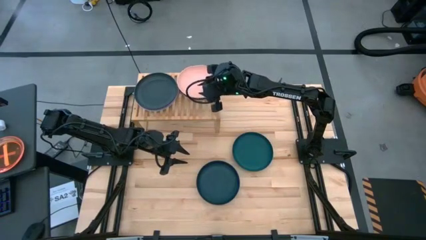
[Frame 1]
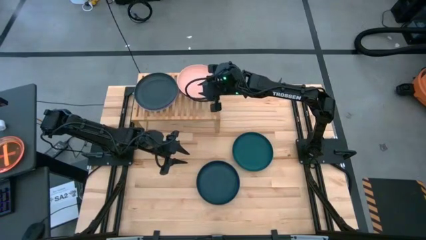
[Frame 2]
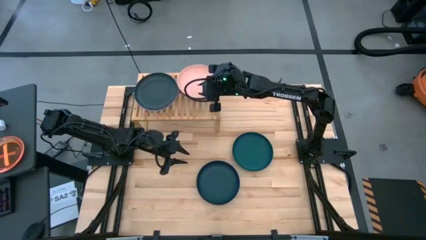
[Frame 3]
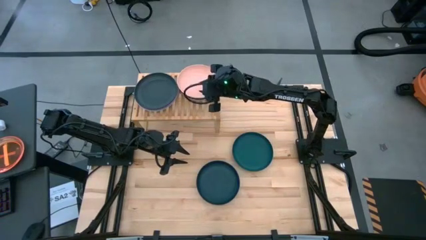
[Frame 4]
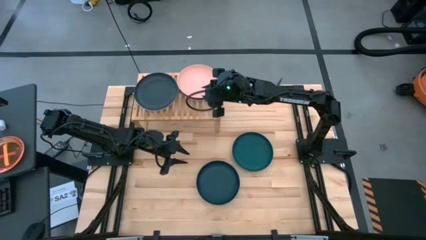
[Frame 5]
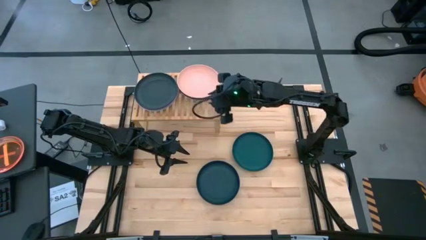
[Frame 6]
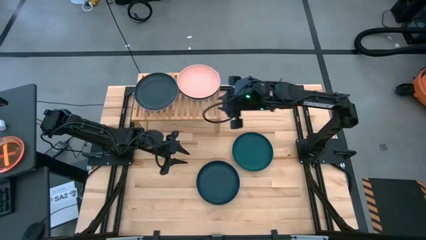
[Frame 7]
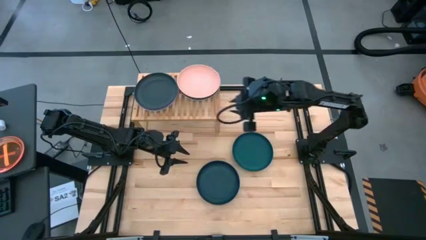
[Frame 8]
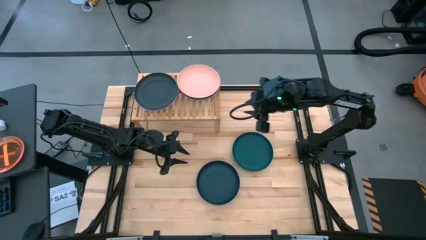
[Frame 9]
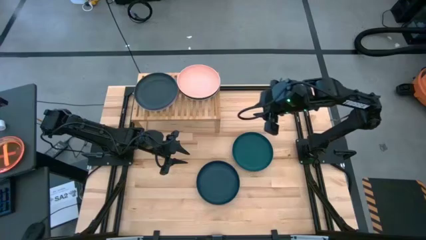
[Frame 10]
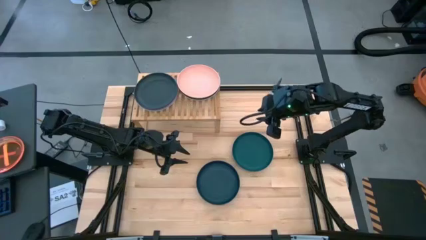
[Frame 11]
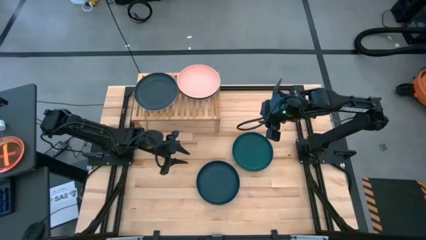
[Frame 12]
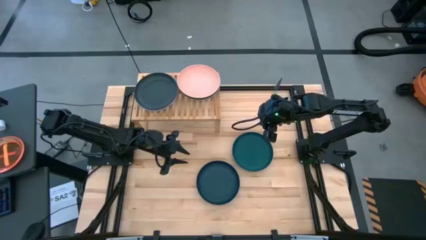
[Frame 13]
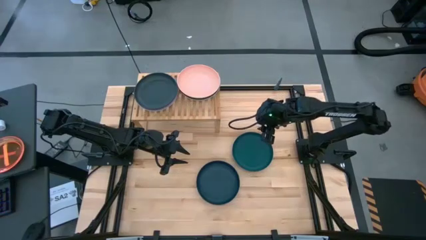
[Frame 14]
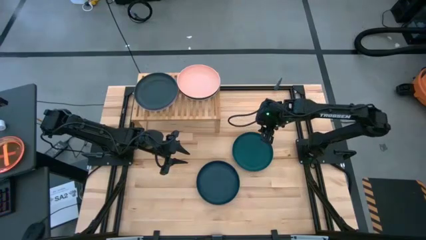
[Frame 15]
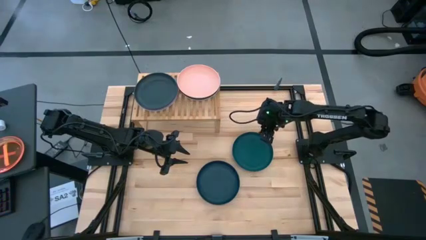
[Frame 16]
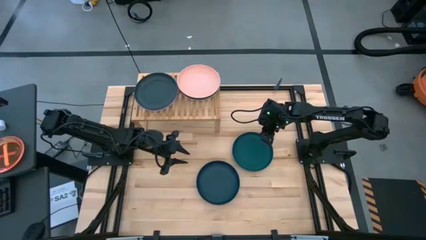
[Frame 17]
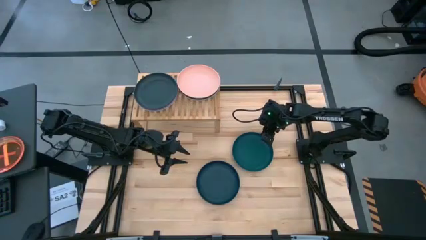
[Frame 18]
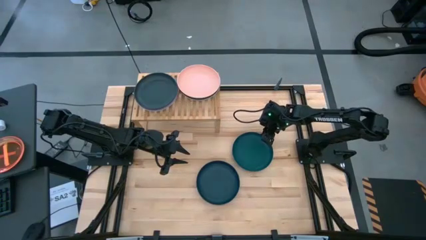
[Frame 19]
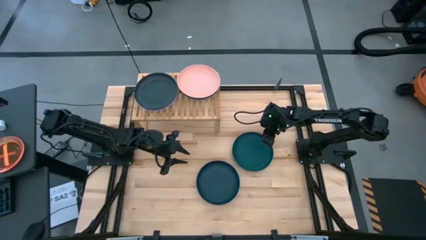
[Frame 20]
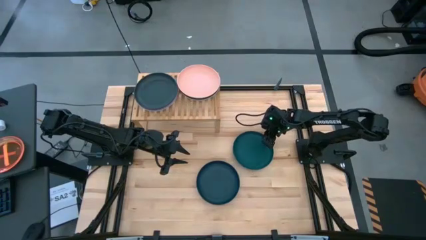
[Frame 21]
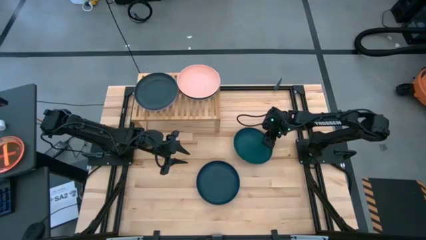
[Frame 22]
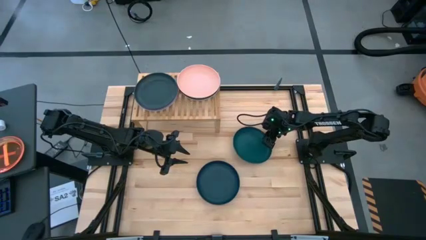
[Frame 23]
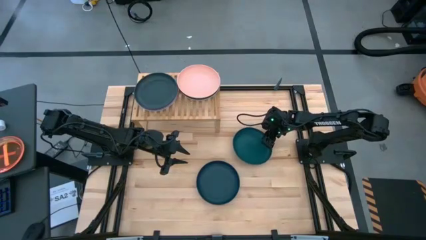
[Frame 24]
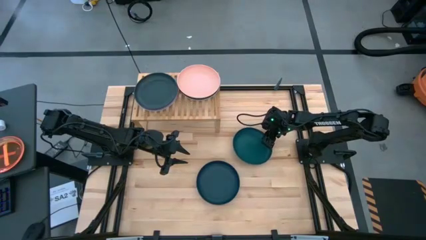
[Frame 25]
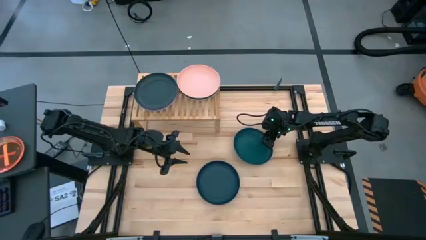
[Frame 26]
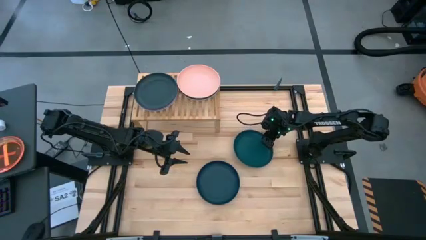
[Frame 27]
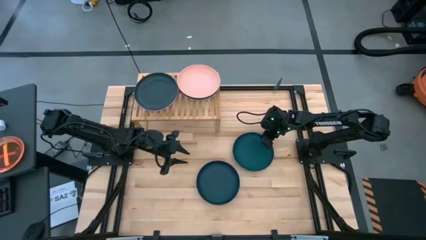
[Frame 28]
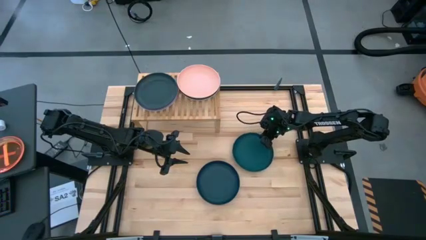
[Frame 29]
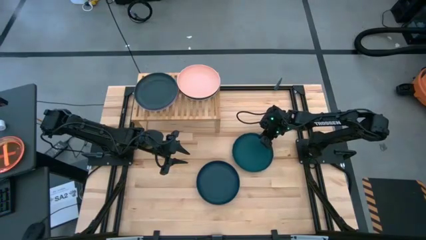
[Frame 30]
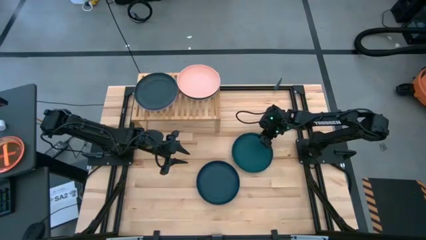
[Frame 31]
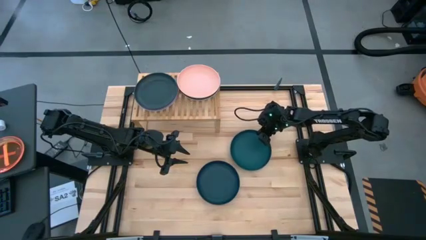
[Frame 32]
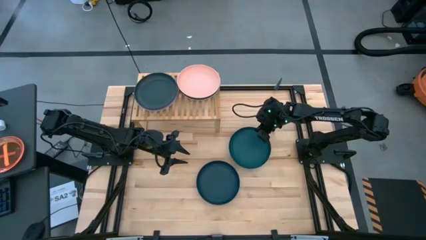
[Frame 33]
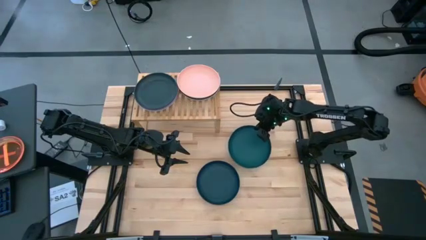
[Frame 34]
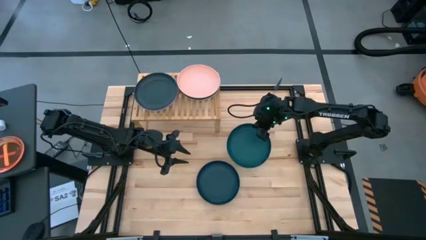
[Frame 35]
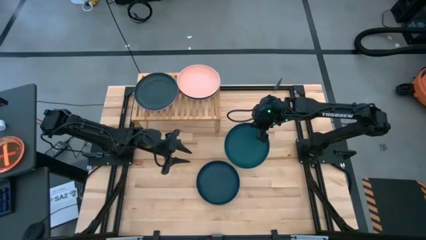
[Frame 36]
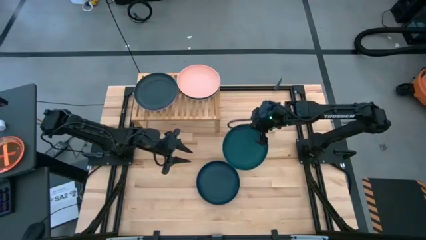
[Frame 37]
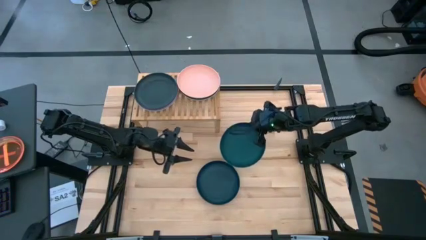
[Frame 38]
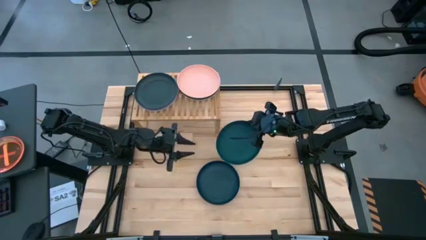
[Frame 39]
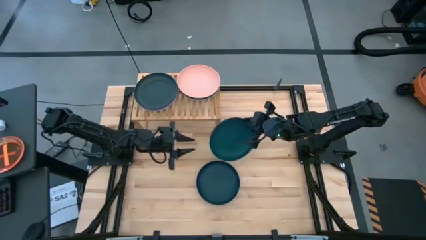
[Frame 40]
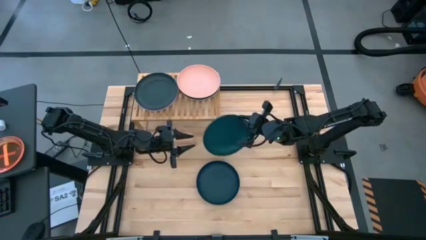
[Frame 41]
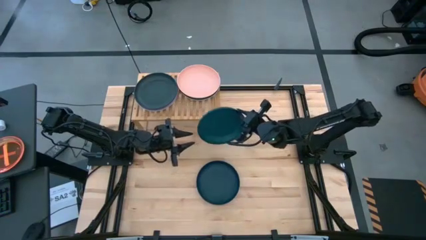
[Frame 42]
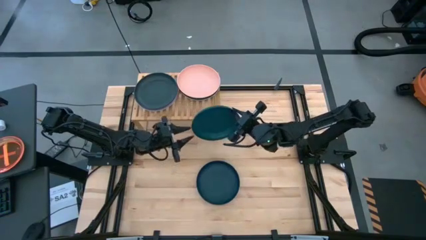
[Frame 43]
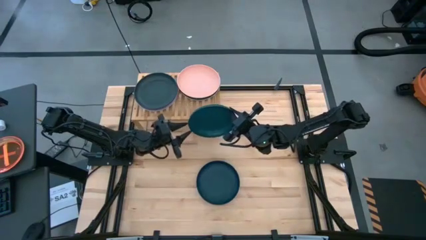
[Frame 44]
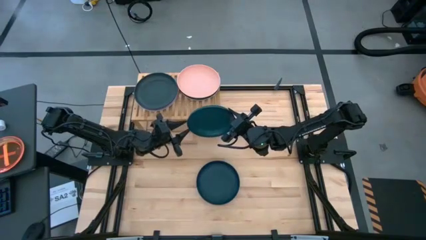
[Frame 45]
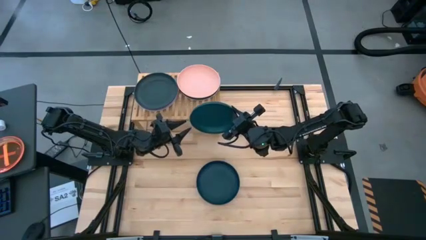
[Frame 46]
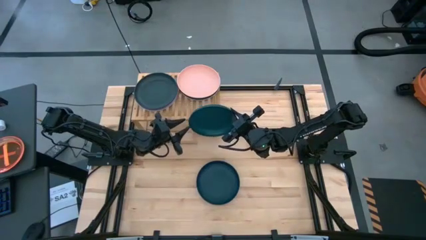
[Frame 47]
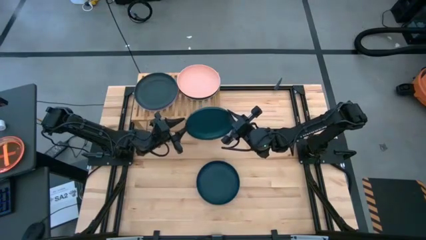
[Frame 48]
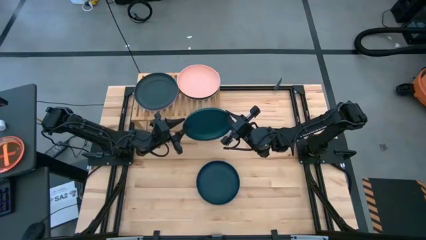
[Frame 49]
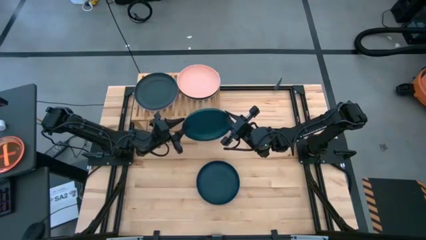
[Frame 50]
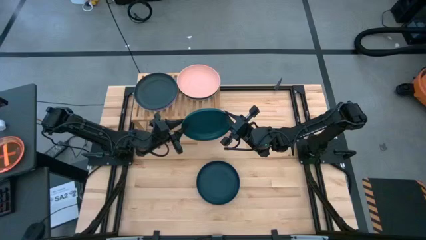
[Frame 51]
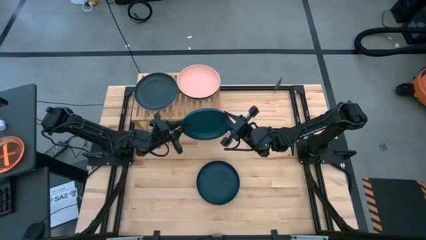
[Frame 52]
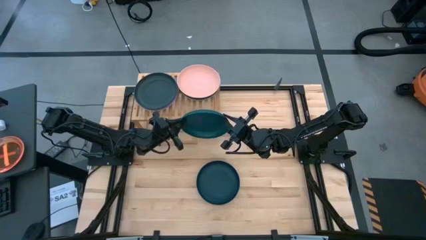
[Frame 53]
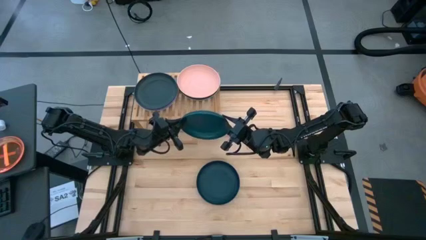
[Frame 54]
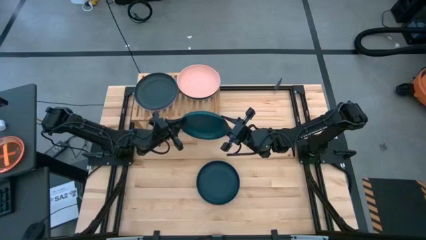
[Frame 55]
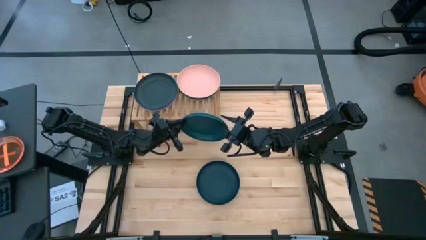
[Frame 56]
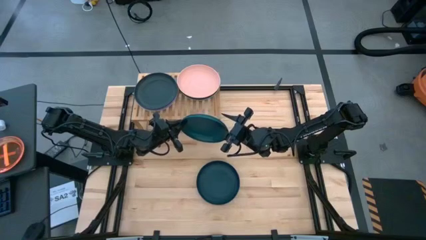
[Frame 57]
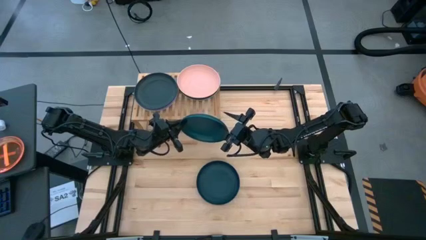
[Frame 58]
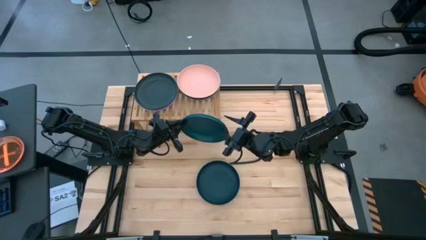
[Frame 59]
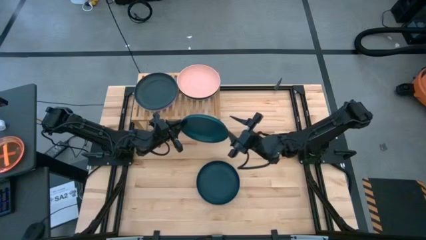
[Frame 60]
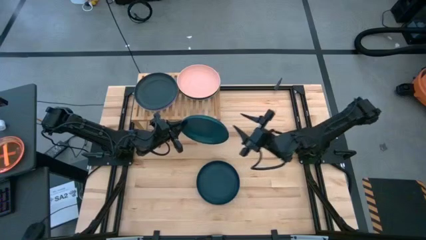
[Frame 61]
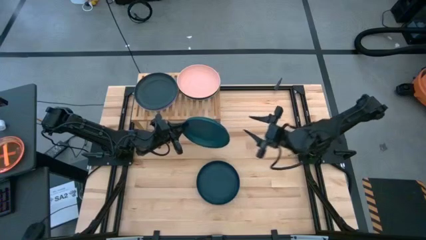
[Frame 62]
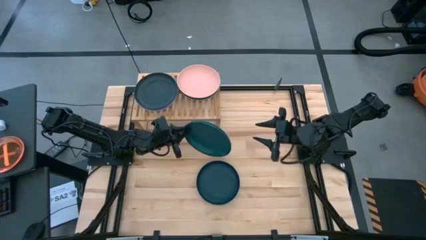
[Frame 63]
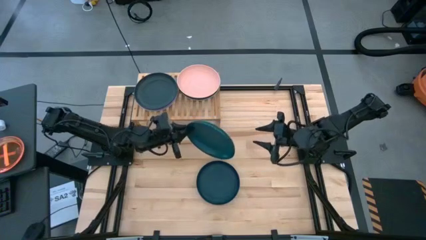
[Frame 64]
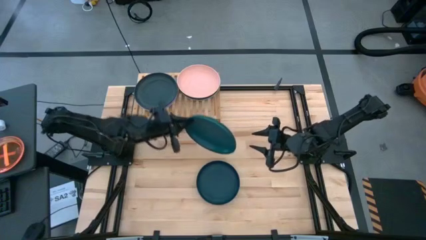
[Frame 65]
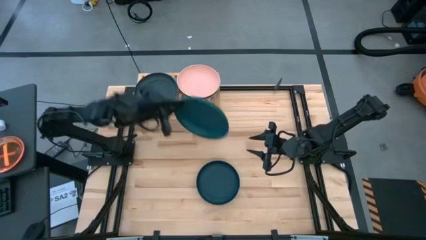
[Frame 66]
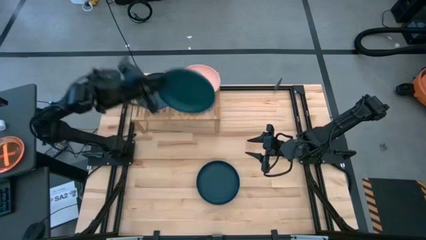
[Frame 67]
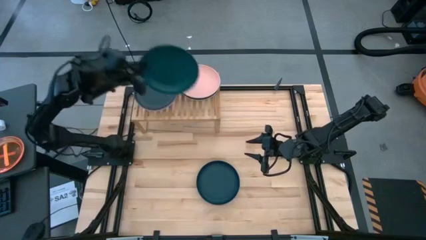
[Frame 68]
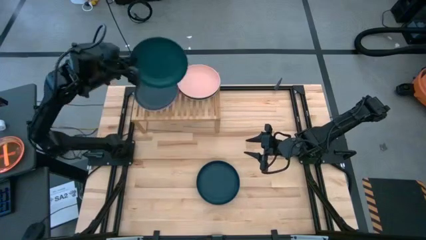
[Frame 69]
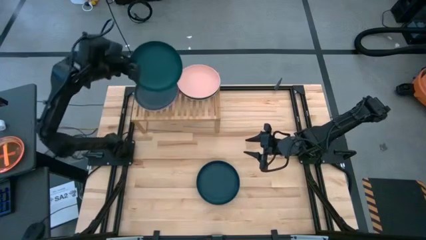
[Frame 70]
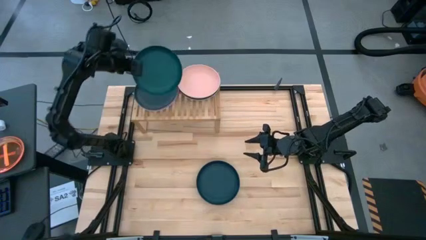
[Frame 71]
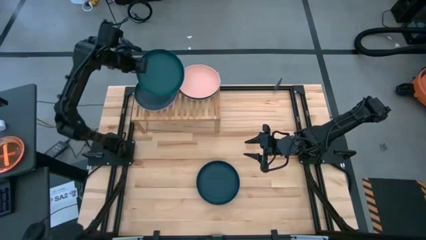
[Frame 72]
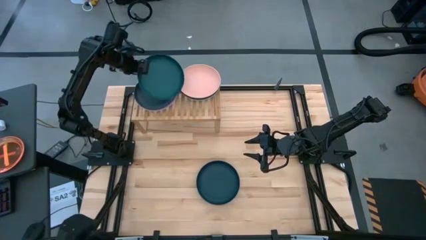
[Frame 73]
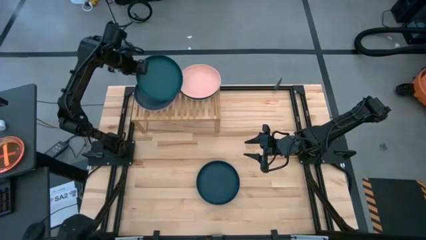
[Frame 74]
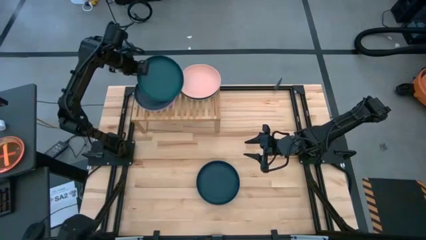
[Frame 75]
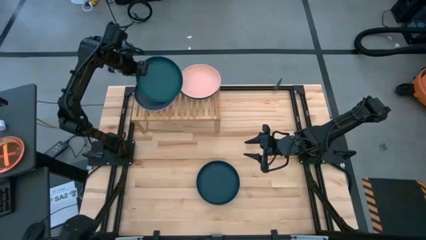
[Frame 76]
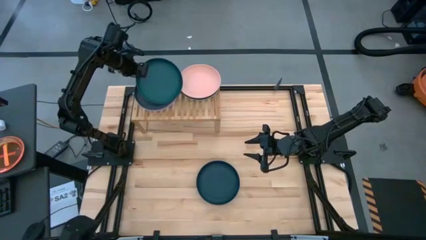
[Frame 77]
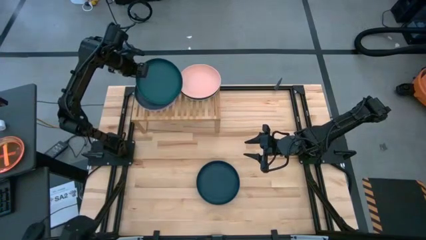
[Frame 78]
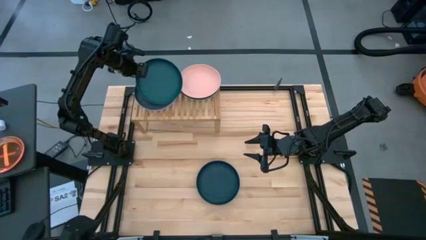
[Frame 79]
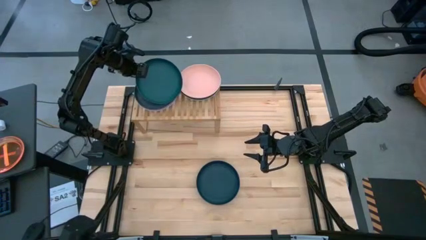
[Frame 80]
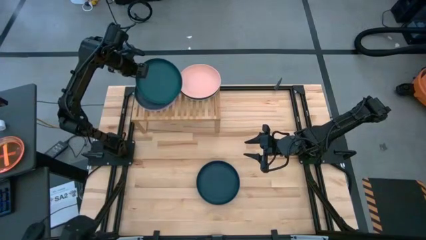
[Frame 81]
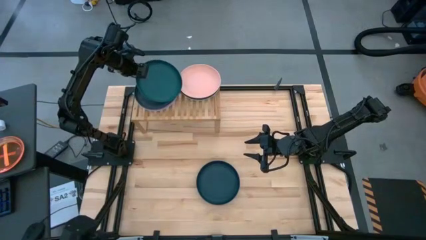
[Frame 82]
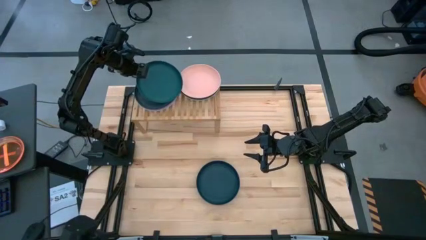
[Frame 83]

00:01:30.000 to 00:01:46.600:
Task: Place and stack plates onto a shelf
Stack the dark green plate on the top of the black plate on the shelf
